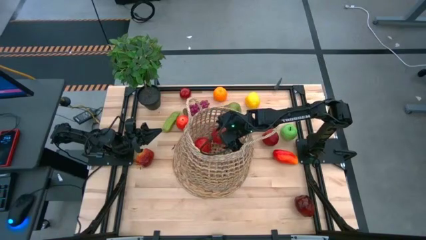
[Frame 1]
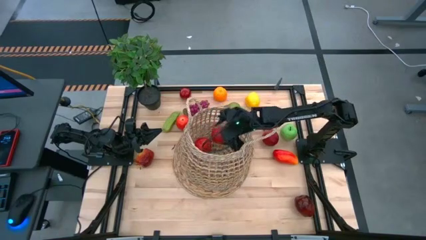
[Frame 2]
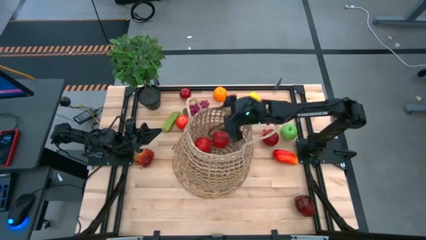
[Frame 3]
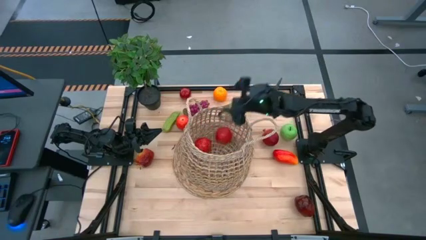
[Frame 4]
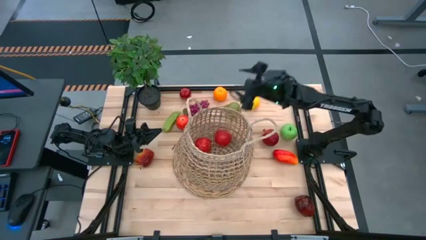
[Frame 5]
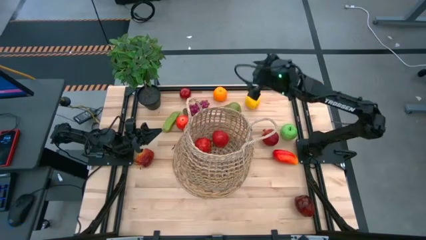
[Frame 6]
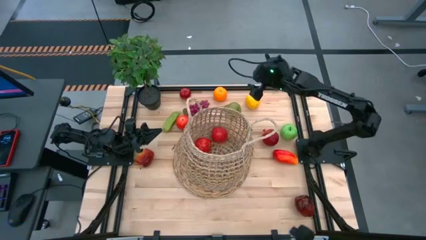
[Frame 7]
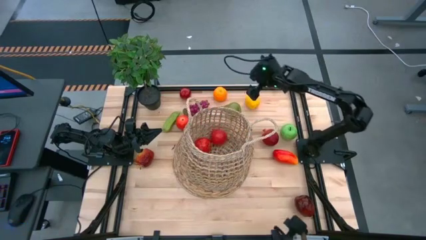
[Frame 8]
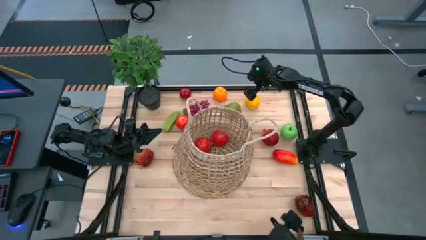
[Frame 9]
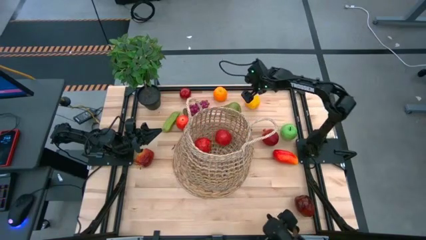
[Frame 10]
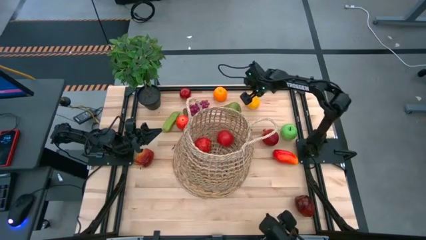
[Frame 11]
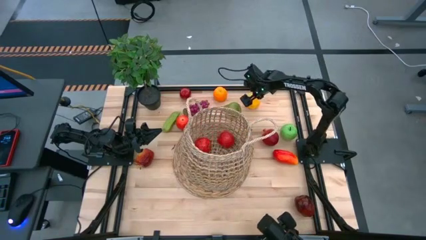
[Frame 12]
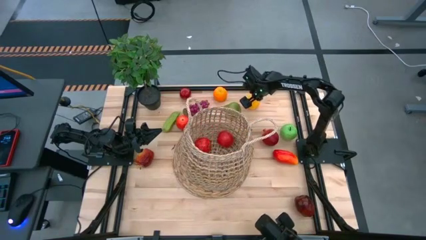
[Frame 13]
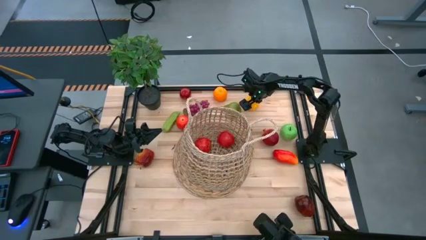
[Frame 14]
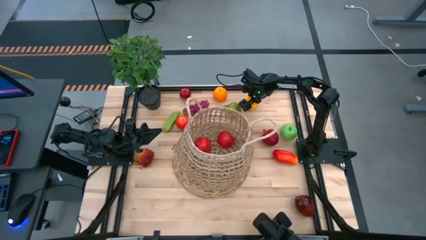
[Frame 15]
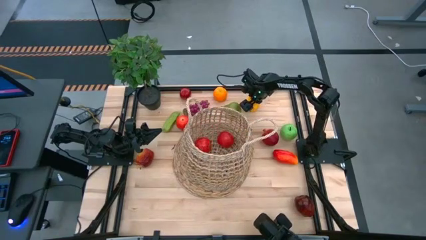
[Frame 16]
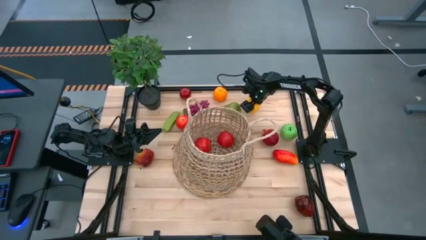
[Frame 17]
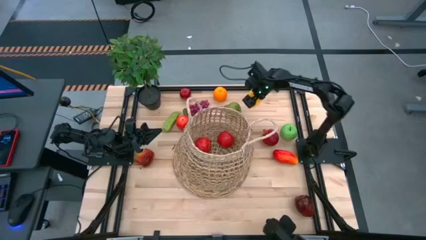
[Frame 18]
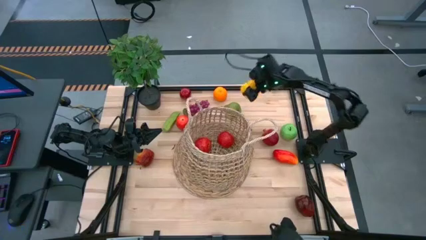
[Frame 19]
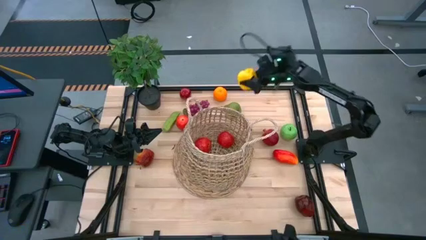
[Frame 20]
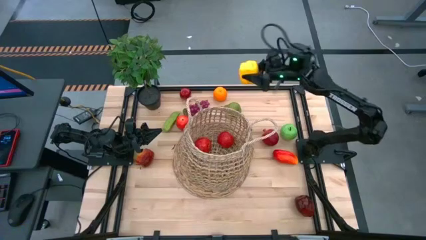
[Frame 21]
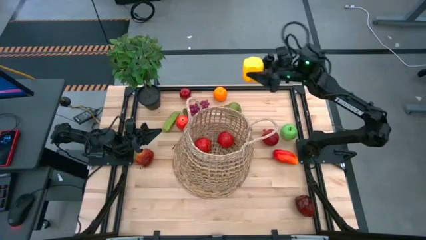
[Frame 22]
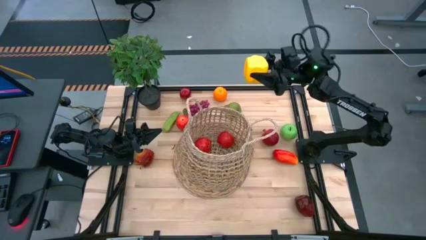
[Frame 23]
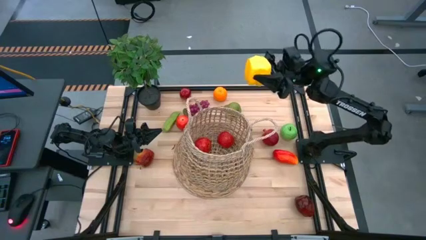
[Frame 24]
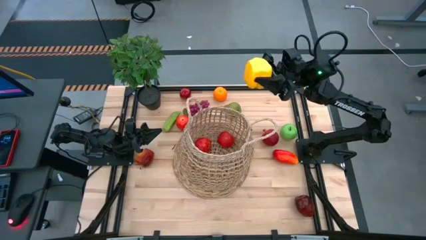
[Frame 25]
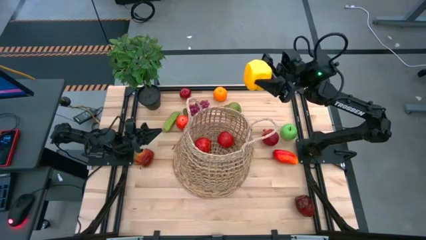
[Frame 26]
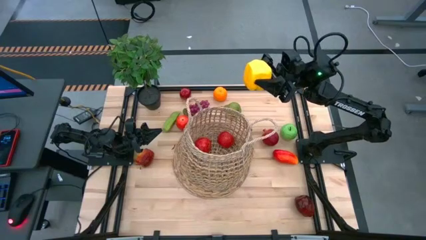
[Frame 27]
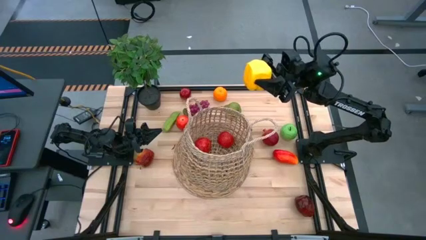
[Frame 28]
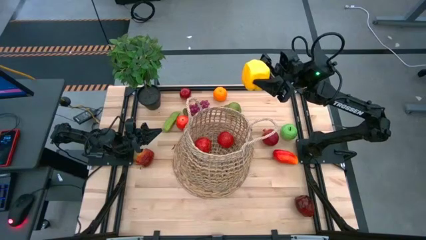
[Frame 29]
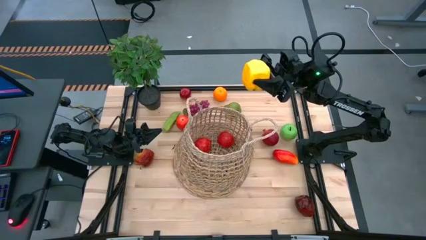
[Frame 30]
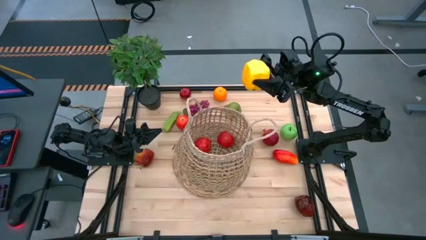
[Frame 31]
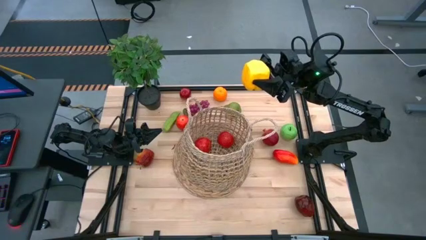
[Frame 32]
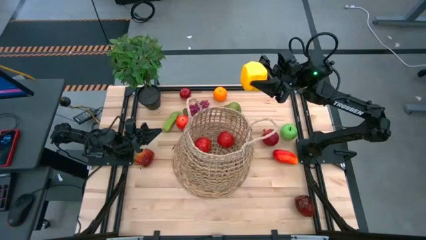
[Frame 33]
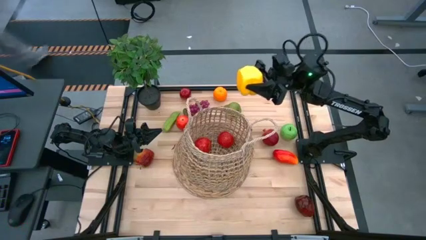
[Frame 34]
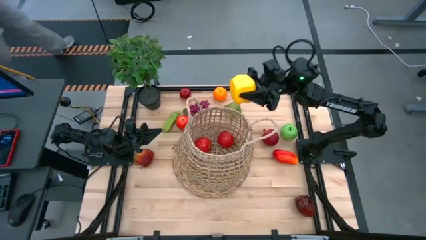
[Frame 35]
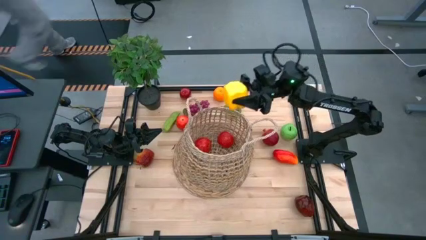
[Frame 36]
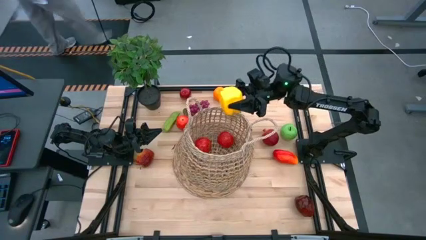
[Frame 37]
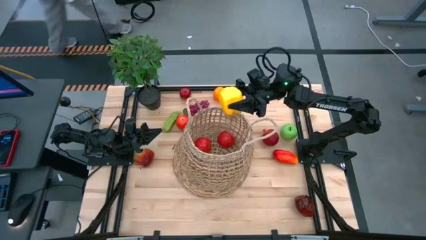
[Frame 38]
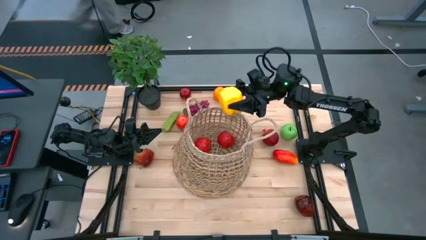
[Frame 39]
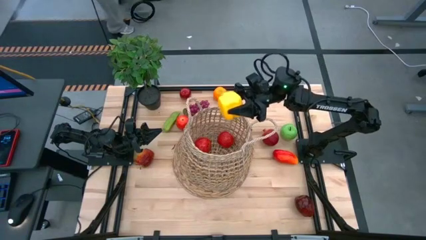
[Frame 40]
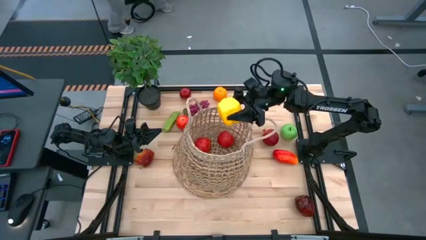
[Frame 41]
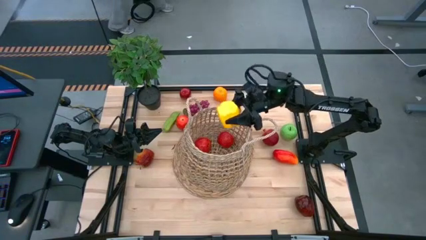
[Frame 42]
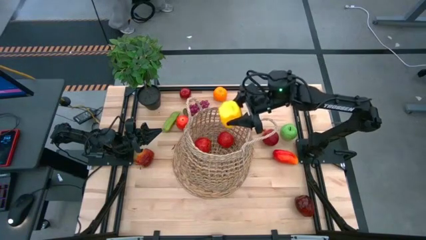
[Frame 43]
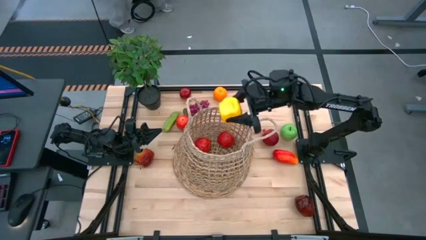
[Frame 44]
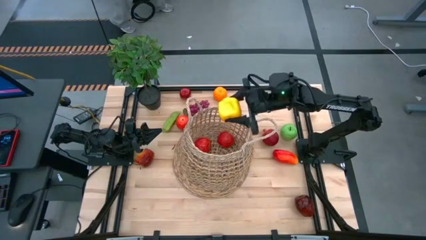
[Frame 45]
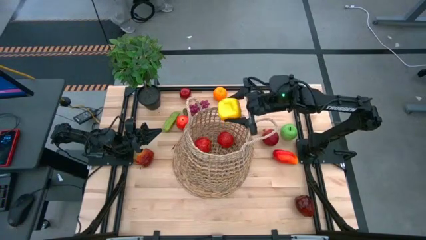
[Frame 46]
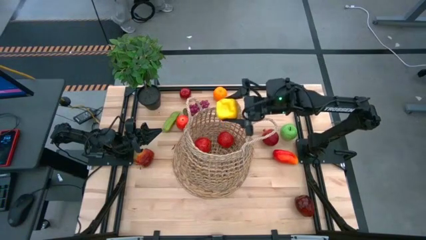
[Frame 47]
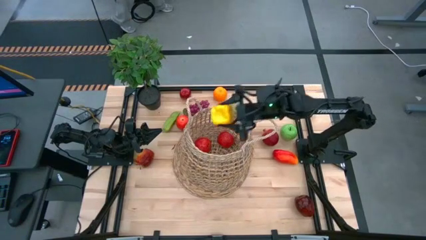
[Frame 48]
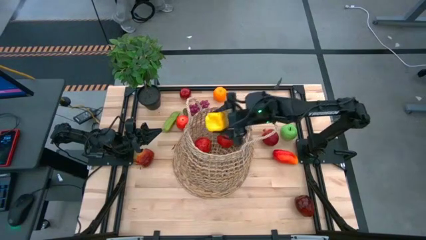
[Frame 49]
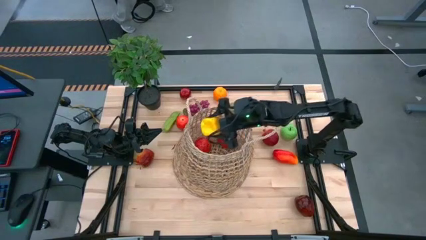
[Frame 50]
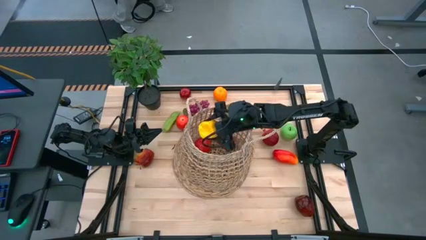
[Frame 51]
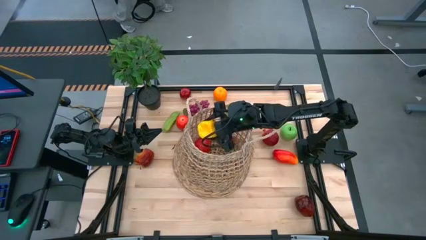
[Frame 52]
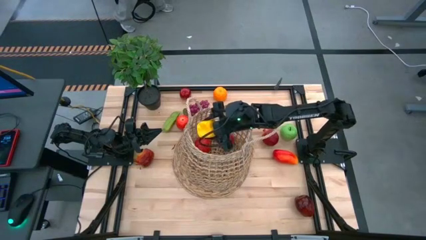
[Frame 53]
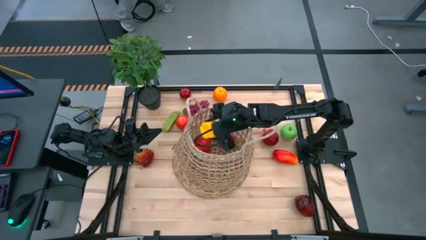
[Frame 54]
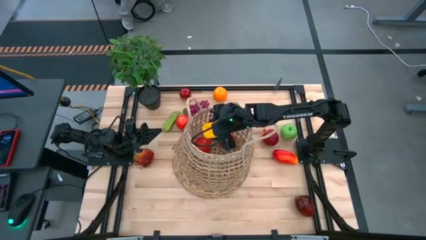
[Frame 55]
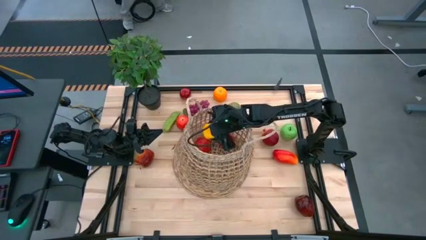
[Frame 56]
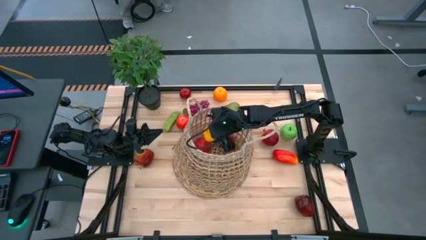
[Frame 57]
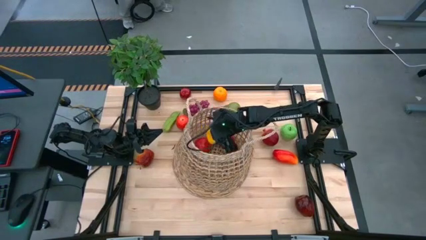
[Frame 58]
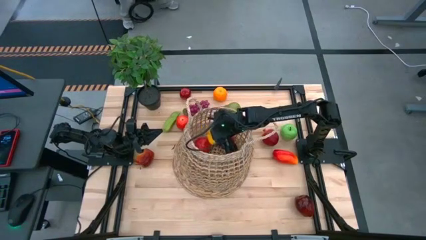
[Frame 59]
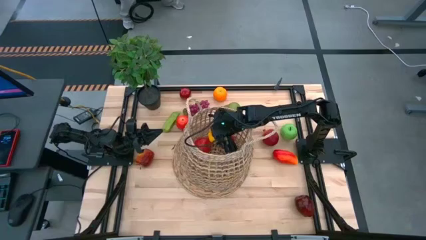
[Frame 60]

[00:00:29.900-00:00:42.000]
Task: Build produce basket
Put the yellow bell pepper into the brown basket

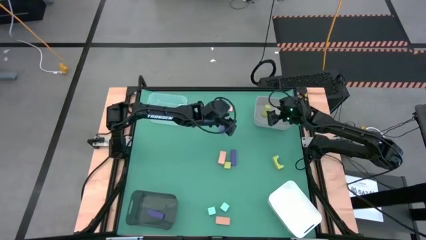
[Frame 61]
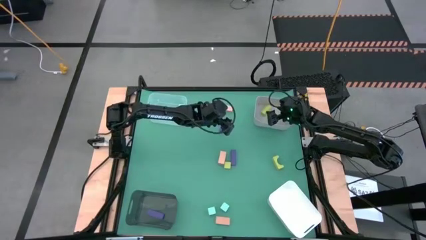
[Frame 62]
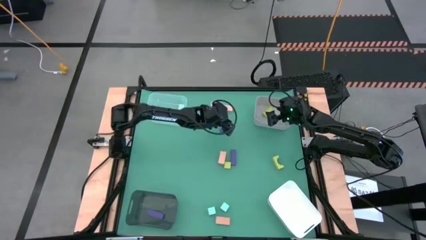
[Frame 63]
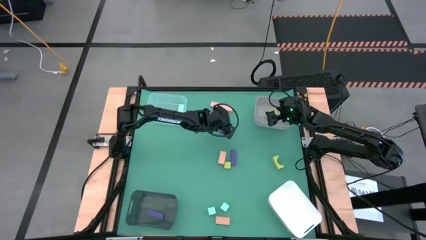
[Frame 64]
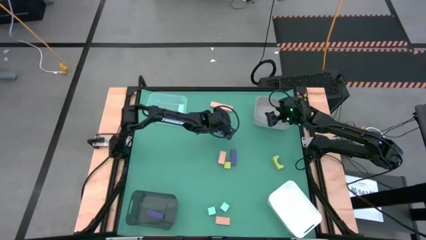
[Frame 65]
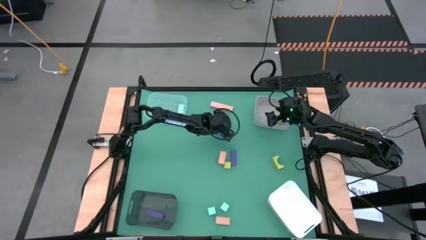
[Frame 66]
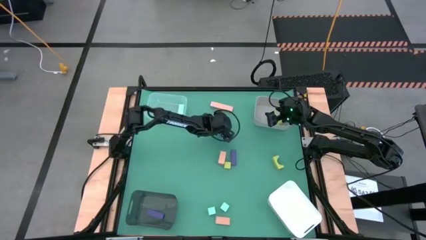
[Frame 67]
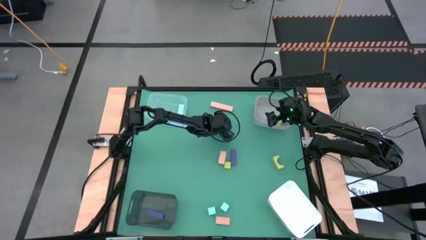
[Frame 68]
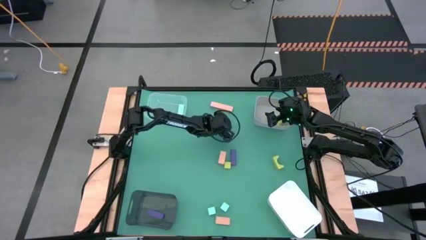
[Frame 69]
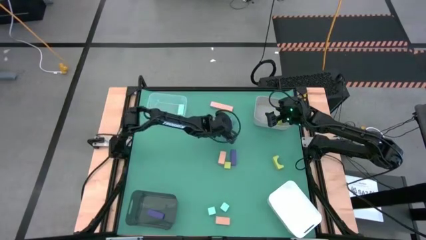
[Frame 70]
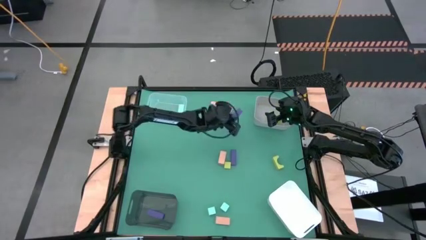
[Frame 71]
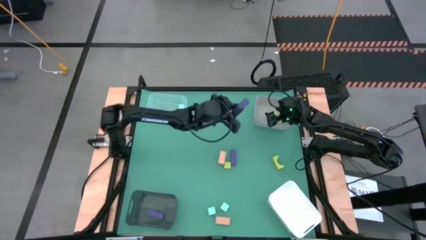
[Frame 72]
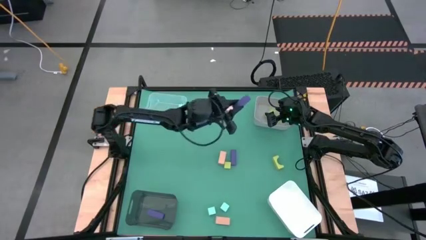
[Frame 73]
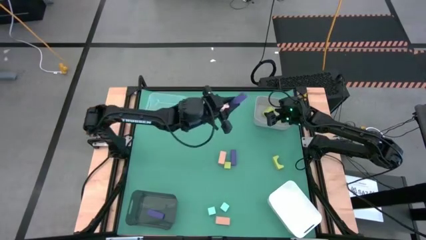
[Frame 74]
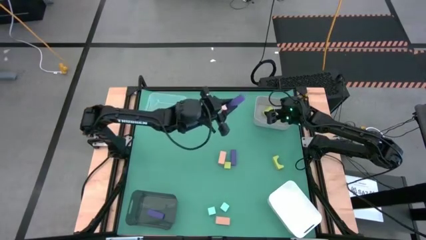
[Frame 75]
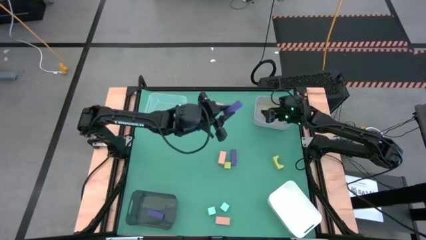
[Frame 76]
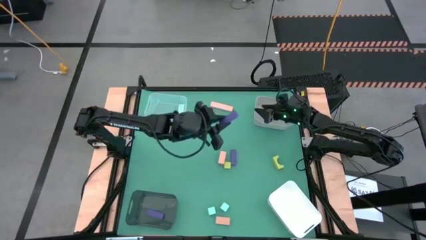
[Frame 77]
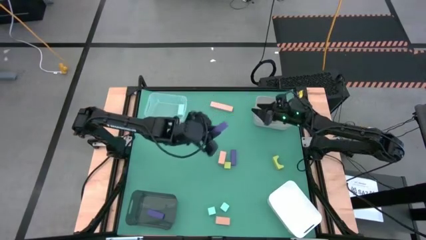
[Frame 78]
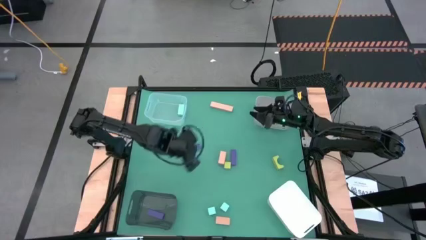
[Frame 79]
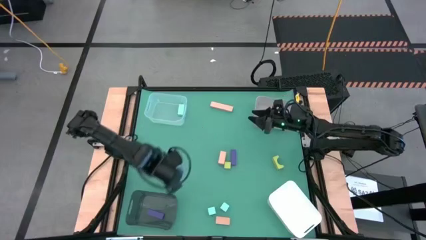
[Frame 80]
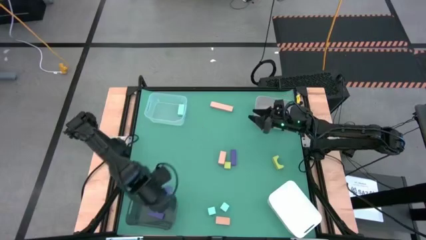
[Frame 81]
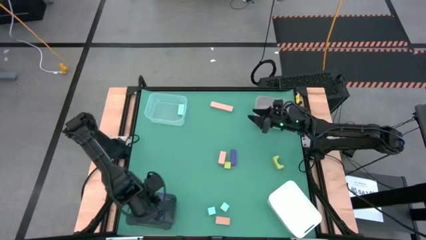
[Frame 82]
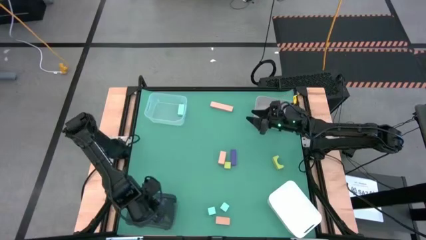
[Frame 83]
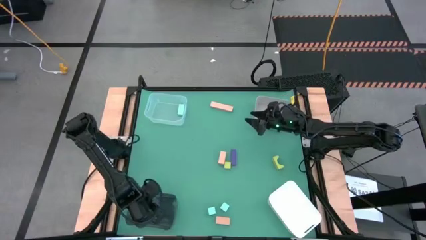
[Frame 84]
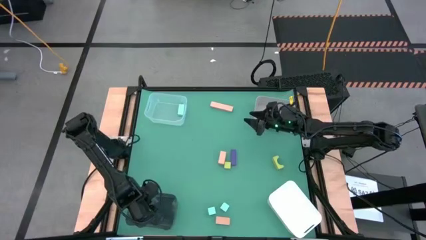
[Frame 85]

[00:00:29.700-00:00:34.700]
Task: Sort & place blocks by color
Put the top violet block into the black bin
